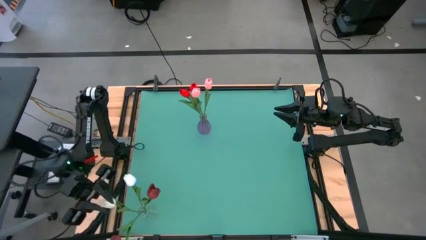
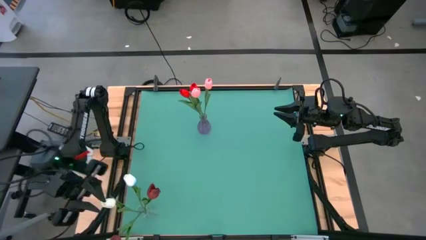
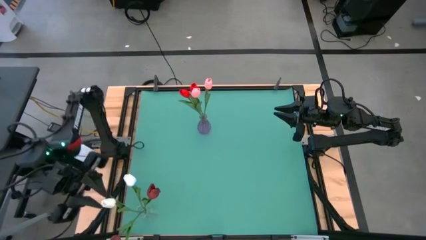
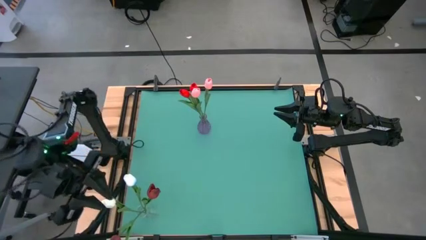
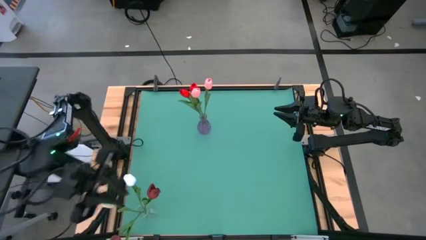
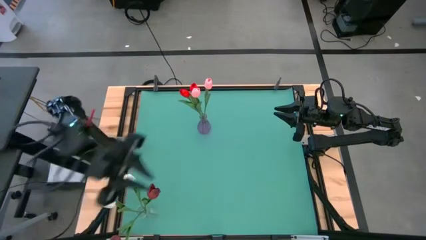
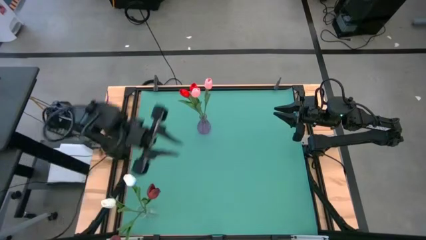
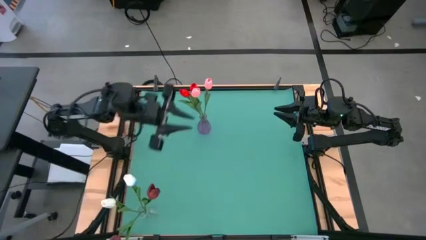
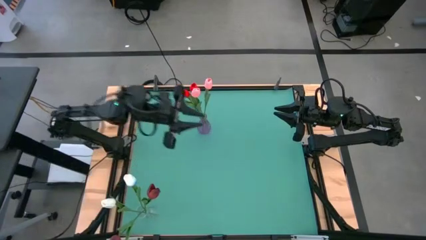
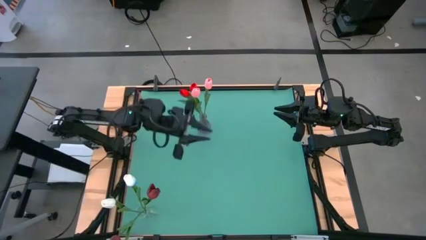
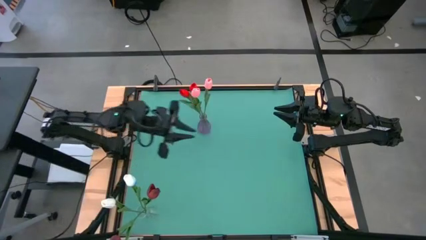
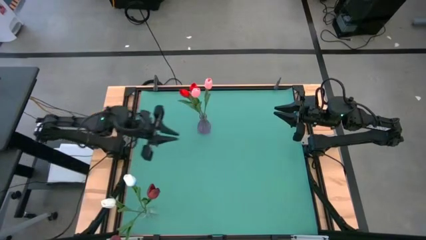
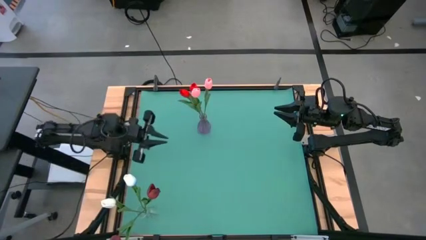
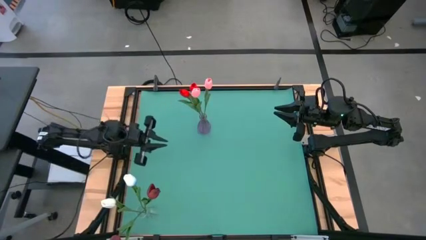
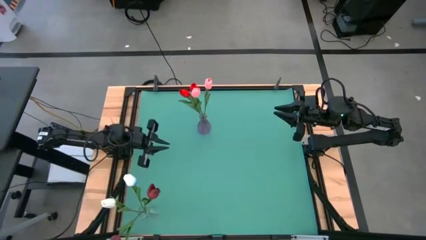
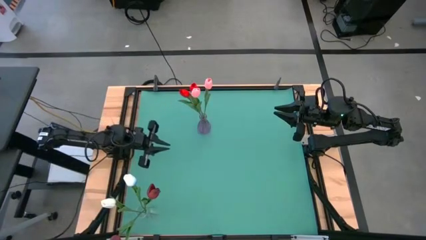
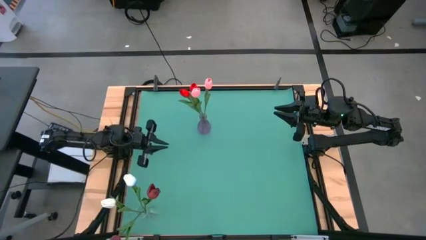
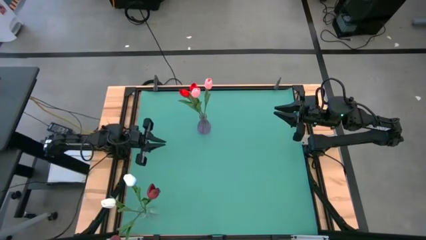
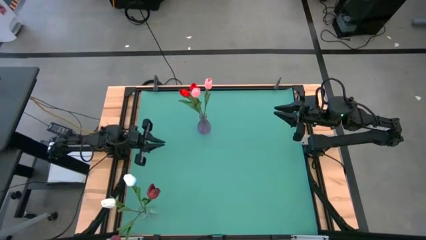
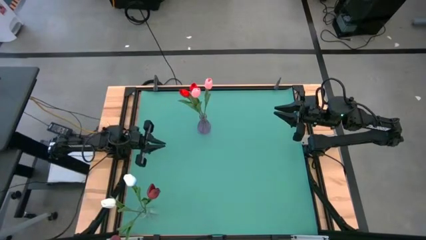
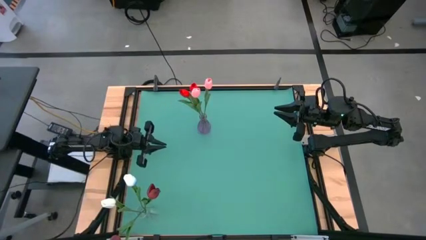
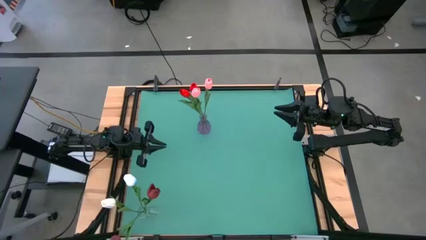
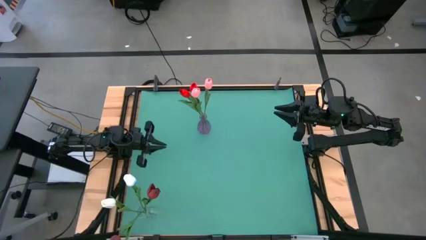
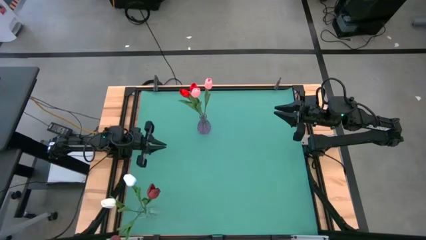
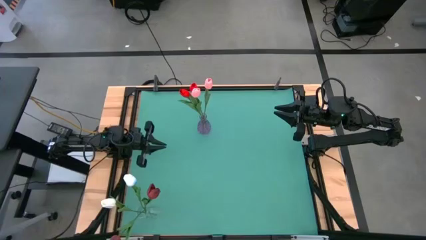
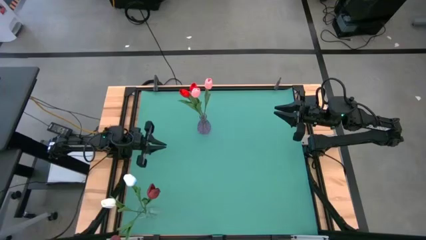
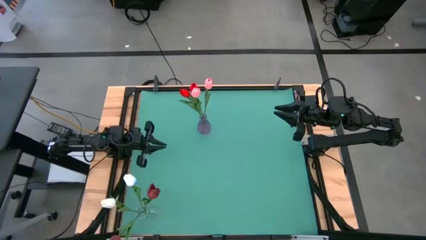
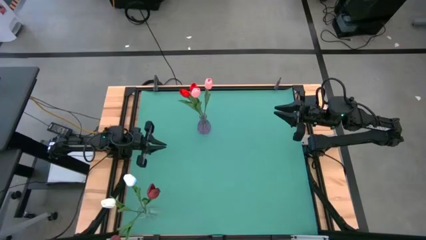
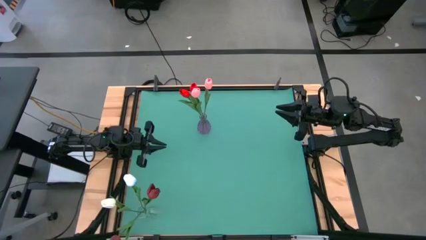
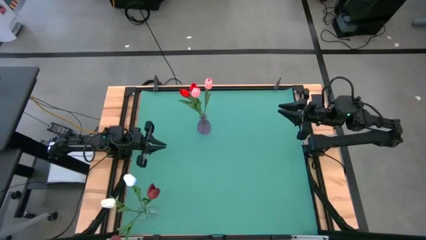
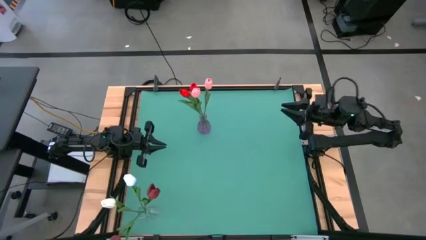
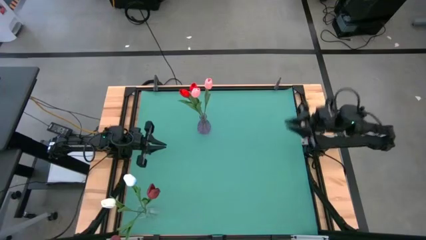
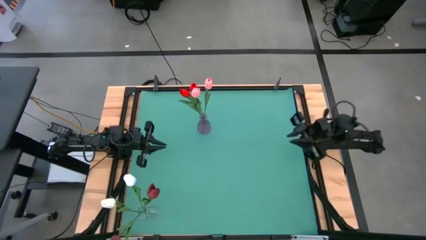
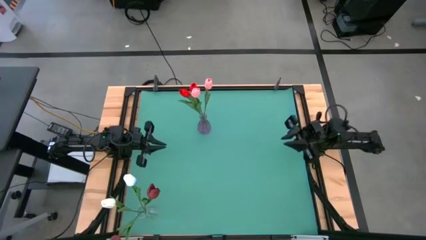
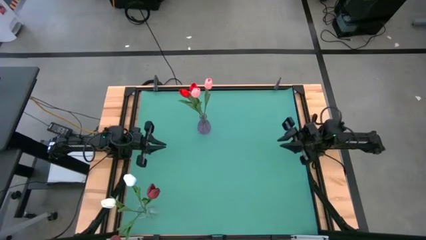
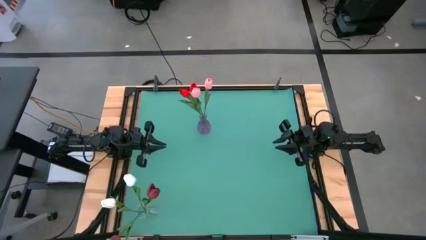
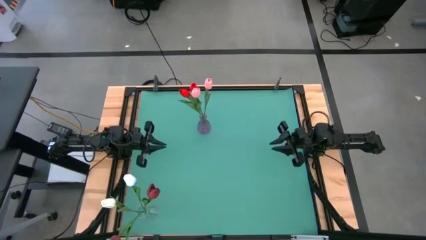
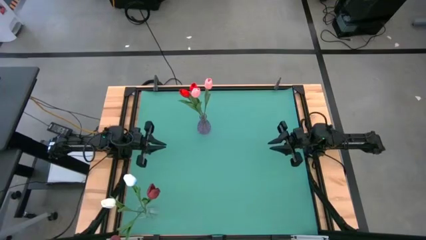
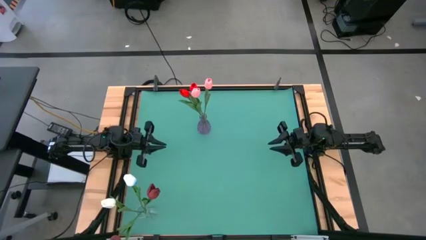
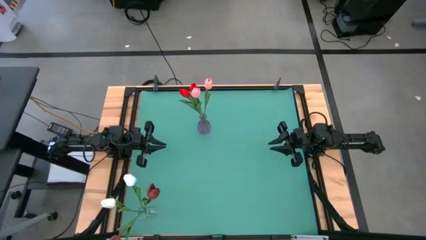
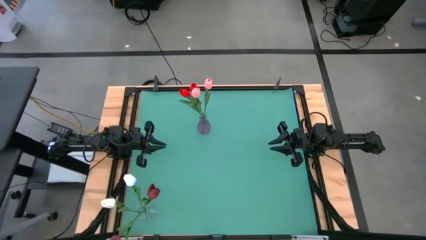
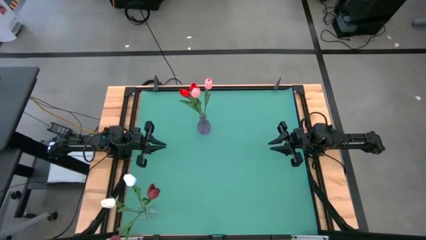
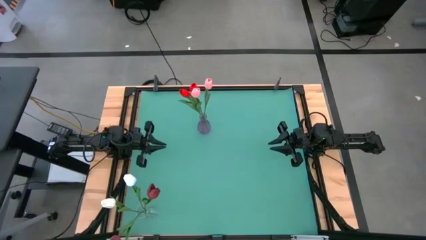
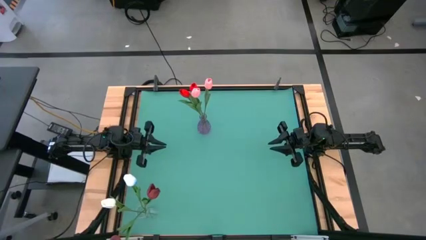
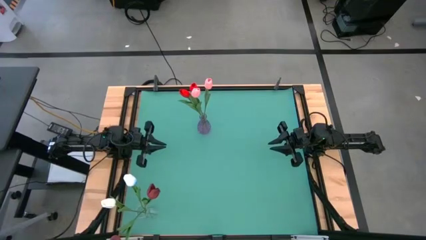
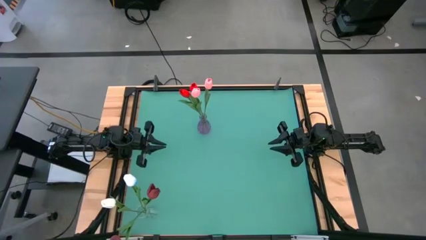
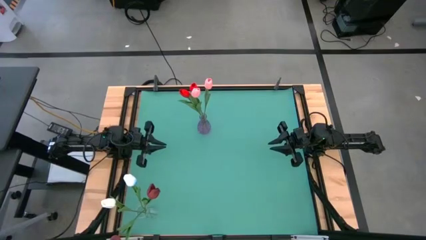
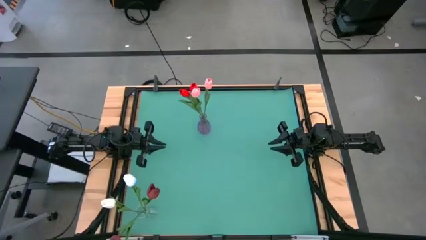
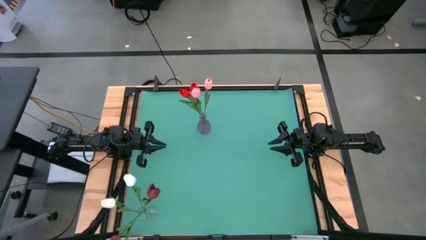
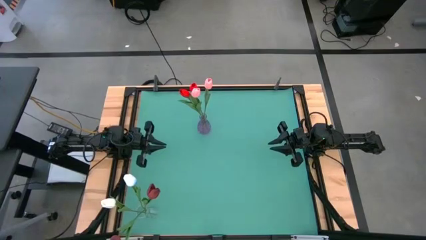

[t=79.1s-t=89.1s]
Task: Sort flowers into vase by color
Return to Home Position

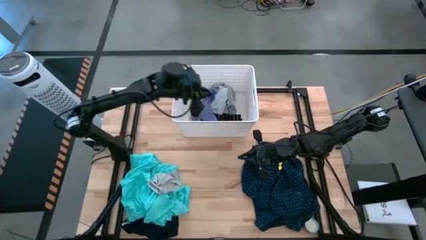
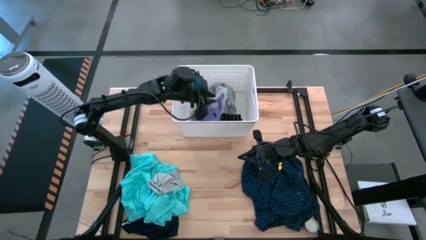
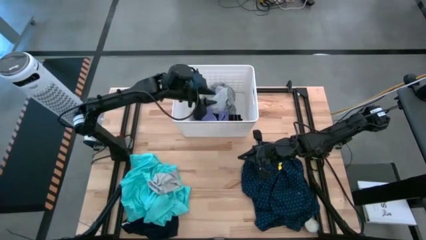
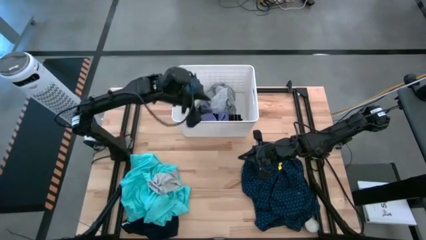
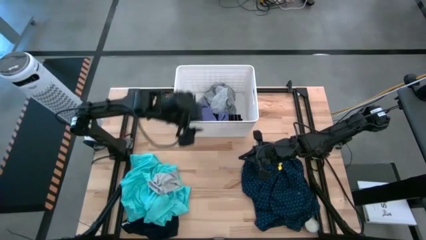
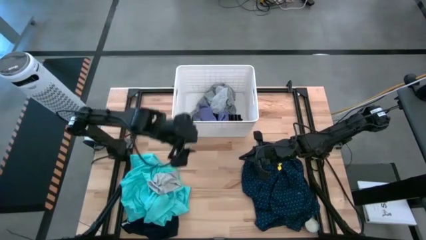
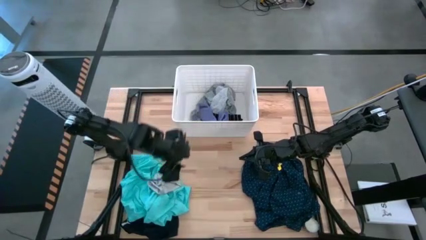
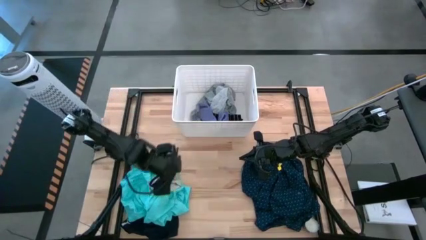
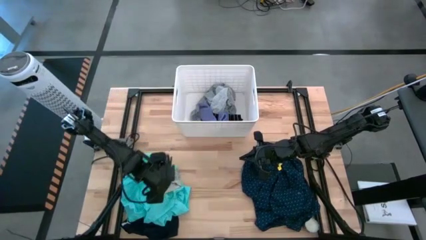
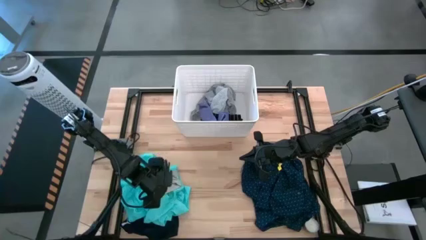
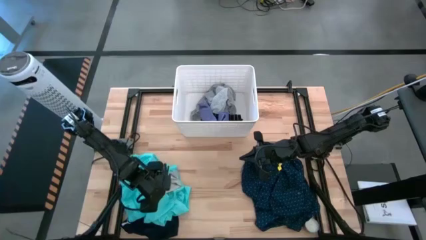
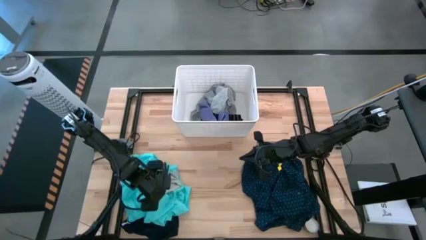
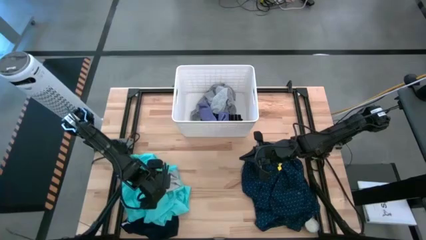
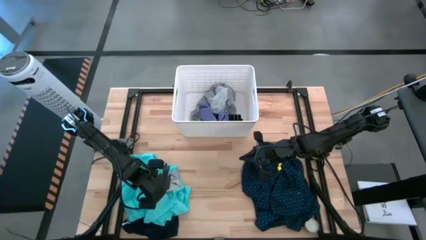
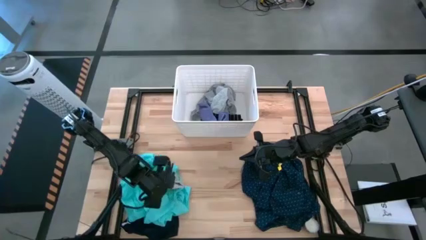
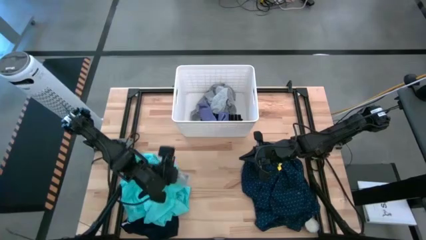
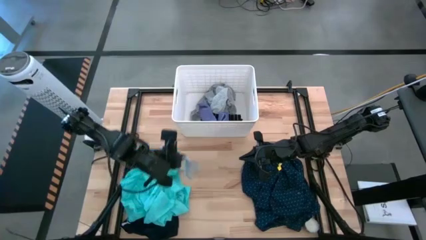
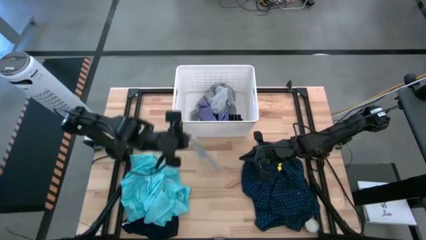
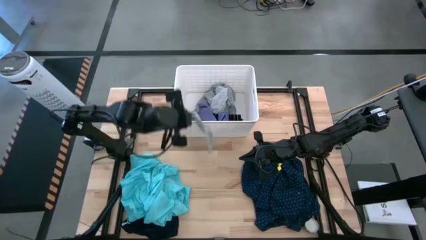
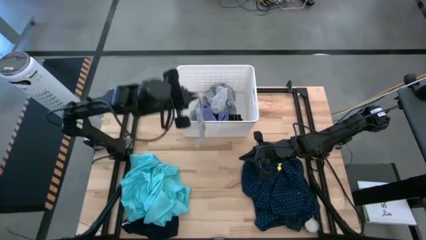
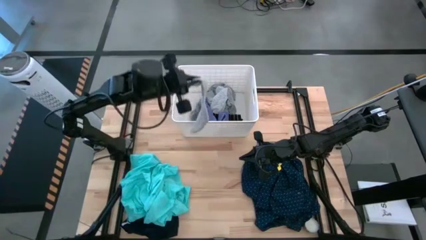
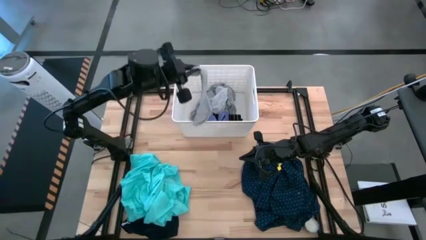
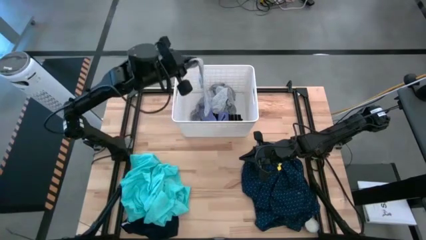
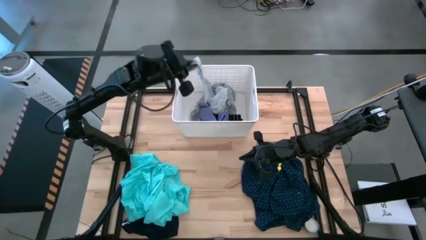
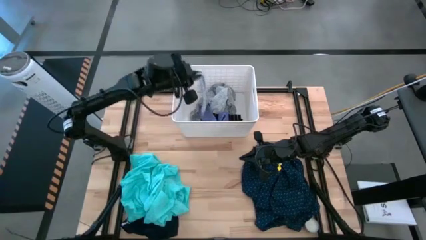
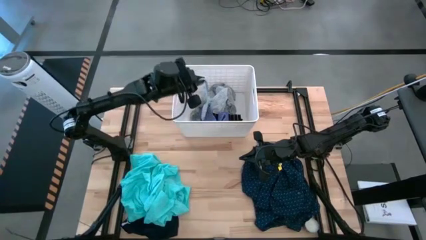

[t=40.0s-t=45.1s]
Task: Sort clothes
Put the gray sock into the white laundry bin
